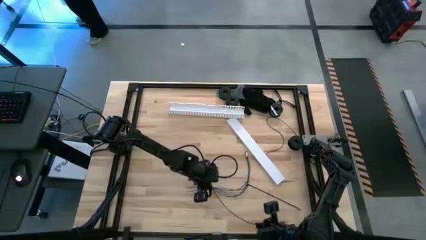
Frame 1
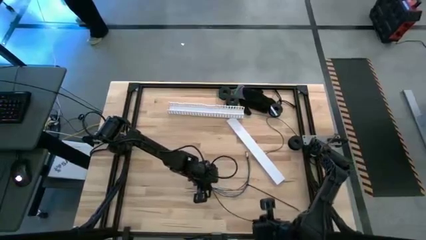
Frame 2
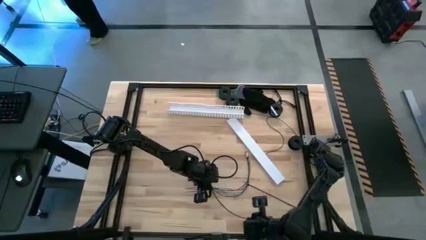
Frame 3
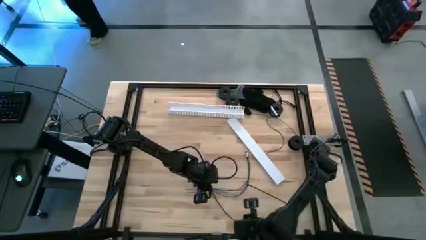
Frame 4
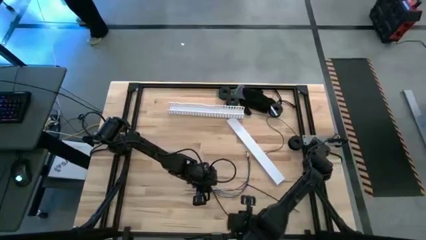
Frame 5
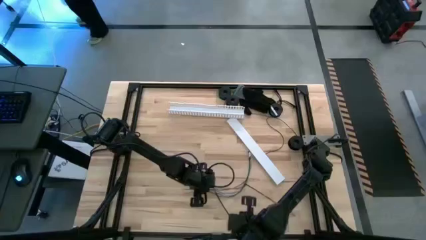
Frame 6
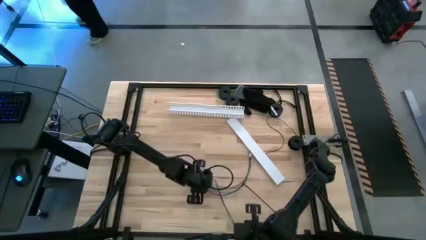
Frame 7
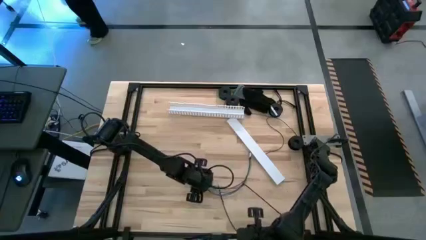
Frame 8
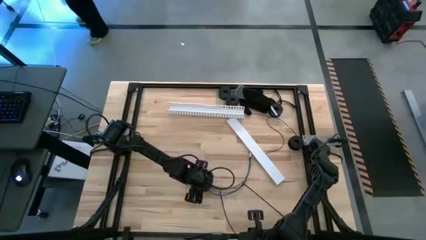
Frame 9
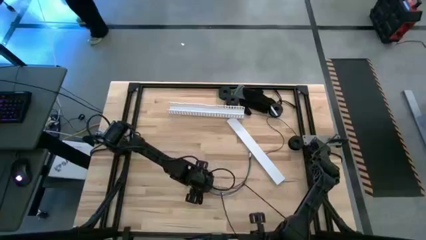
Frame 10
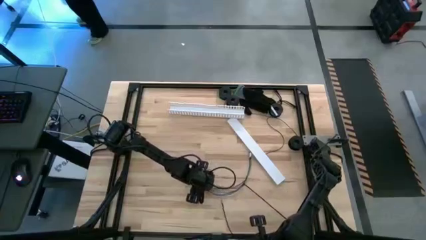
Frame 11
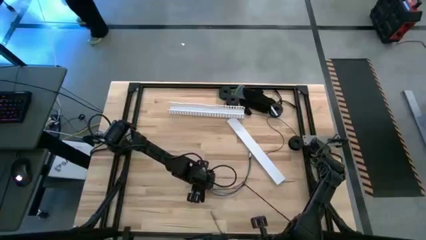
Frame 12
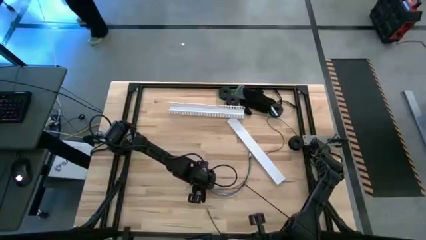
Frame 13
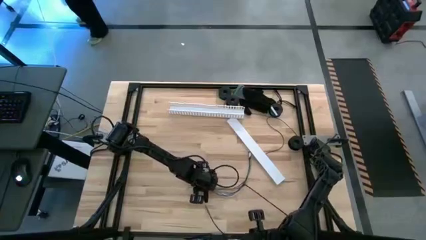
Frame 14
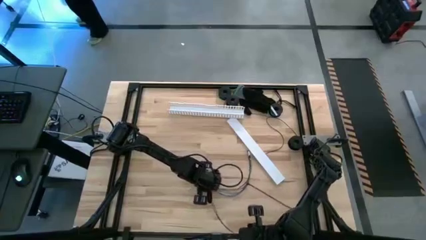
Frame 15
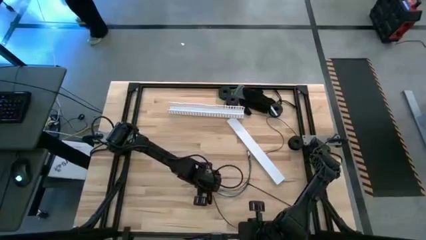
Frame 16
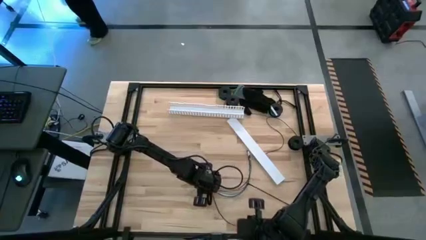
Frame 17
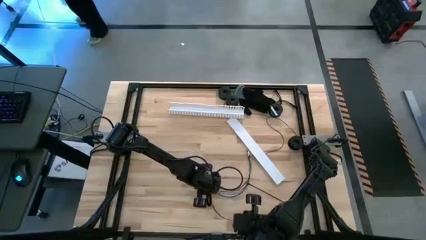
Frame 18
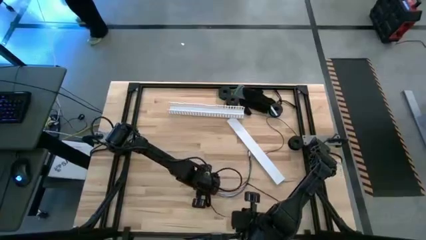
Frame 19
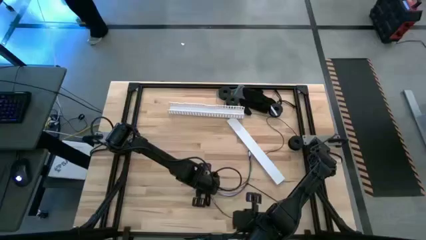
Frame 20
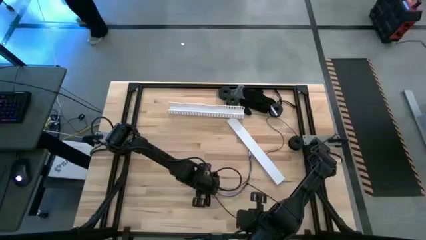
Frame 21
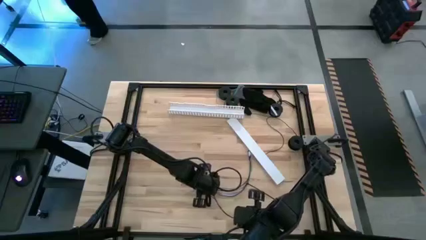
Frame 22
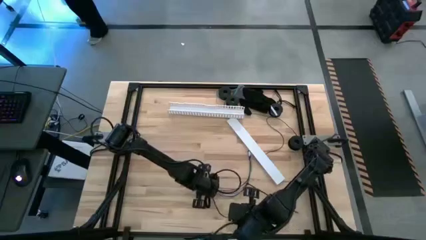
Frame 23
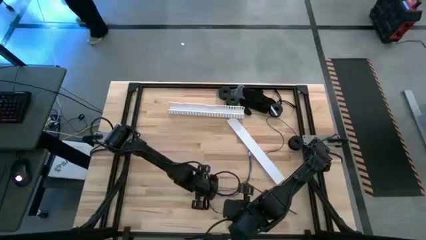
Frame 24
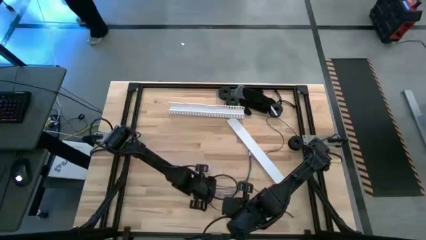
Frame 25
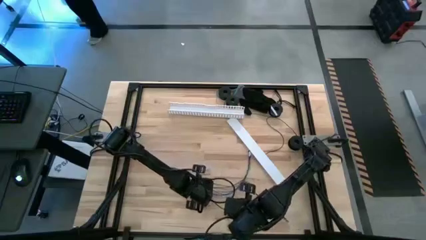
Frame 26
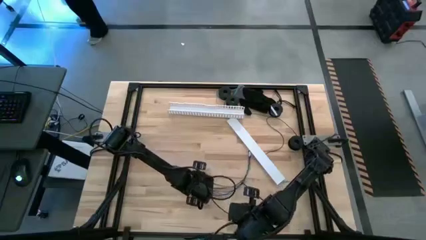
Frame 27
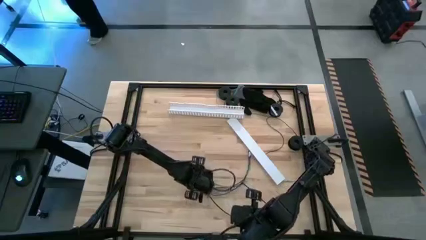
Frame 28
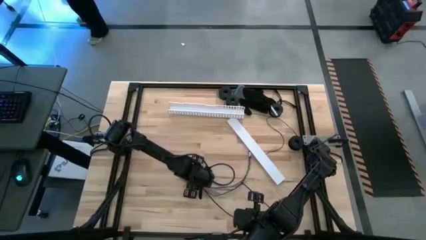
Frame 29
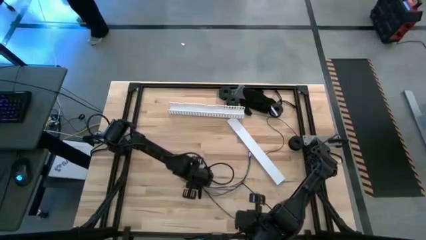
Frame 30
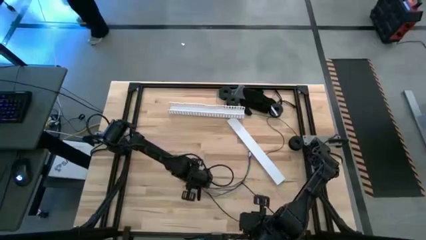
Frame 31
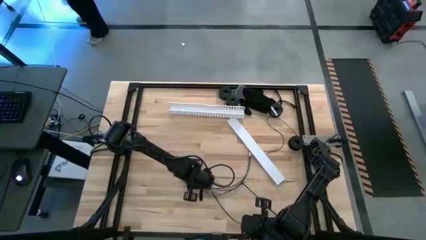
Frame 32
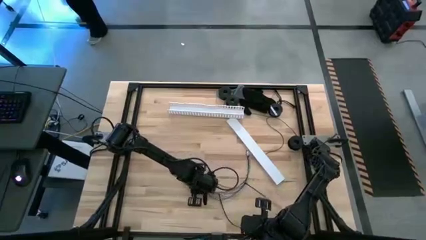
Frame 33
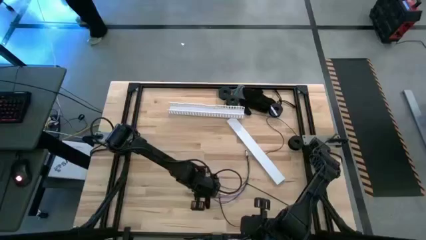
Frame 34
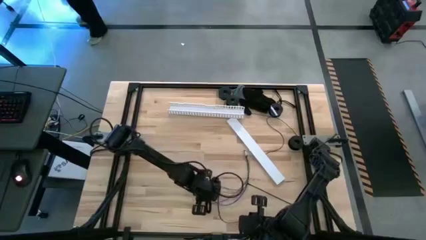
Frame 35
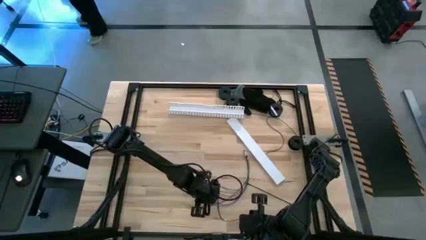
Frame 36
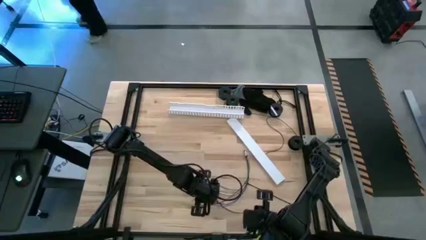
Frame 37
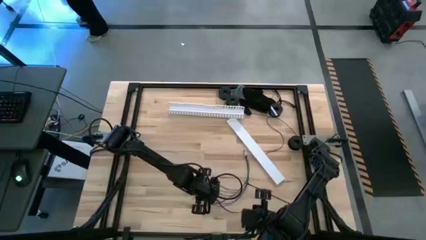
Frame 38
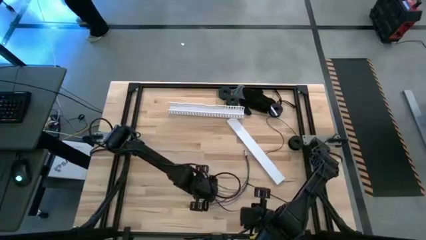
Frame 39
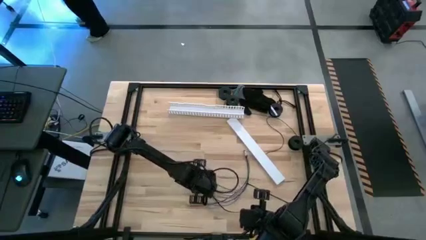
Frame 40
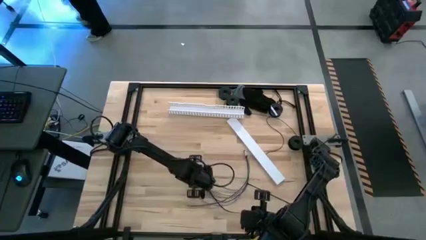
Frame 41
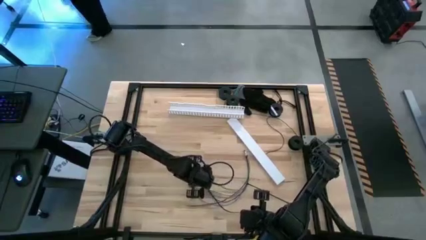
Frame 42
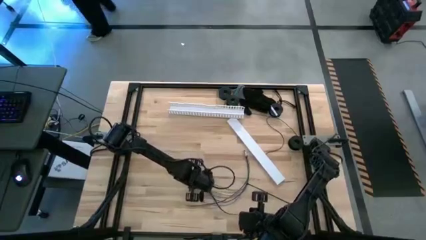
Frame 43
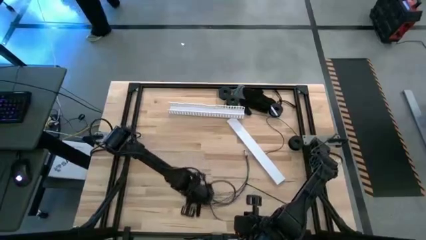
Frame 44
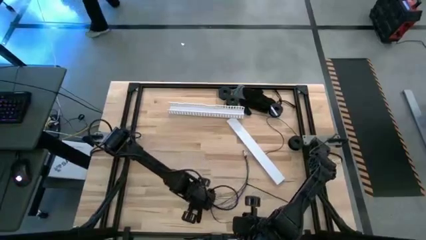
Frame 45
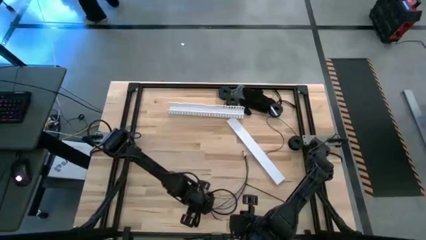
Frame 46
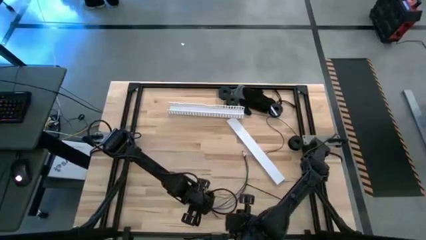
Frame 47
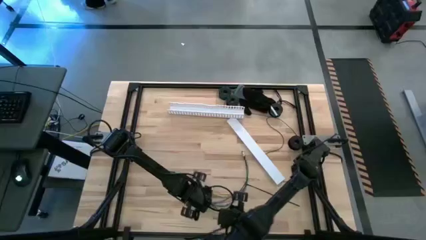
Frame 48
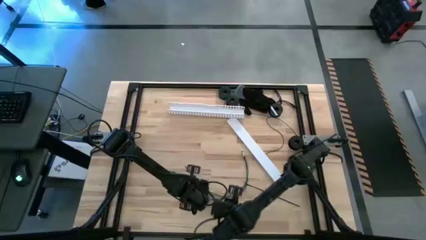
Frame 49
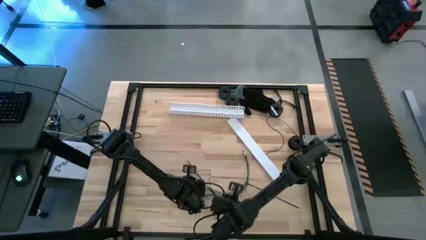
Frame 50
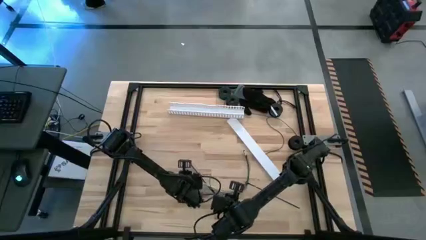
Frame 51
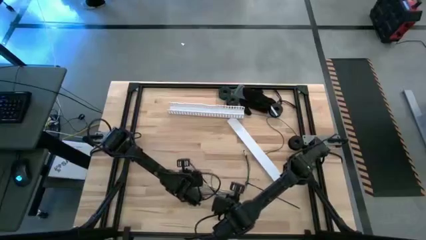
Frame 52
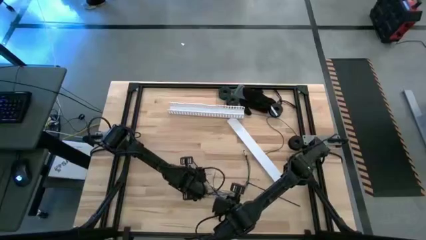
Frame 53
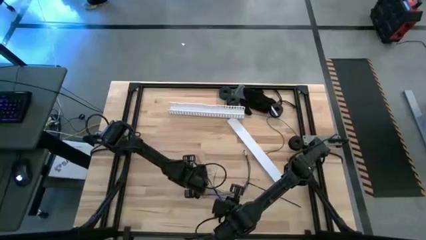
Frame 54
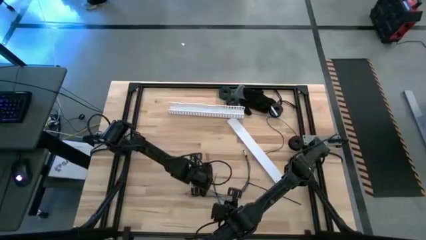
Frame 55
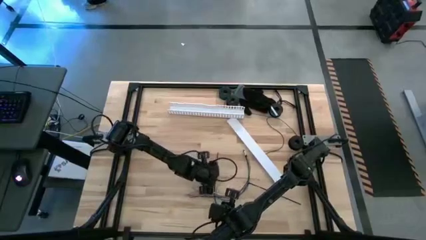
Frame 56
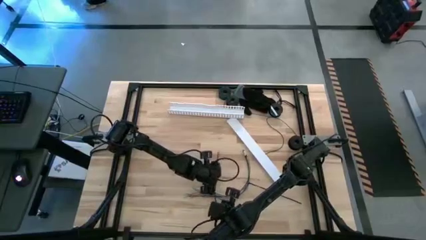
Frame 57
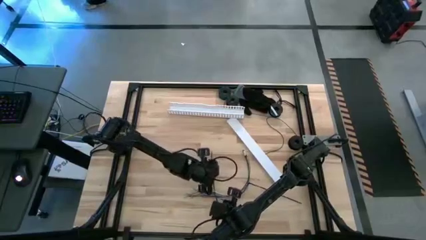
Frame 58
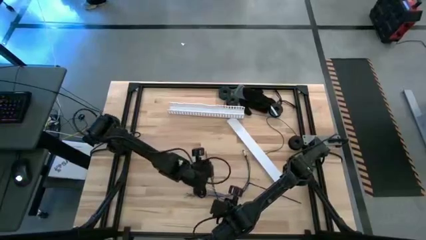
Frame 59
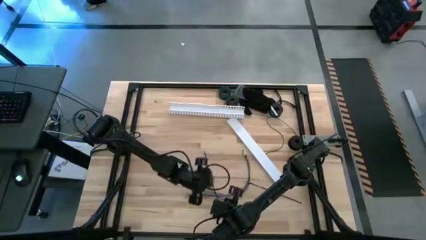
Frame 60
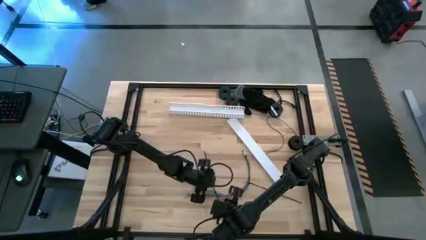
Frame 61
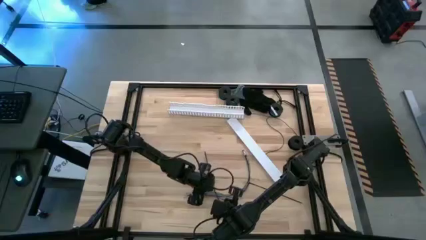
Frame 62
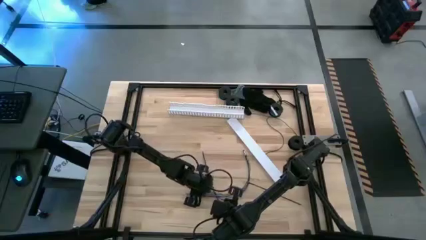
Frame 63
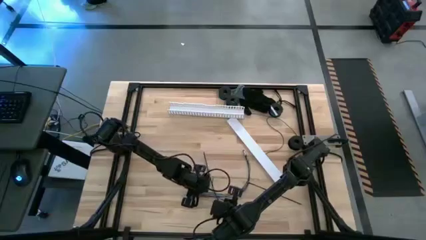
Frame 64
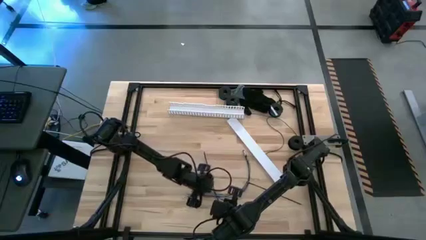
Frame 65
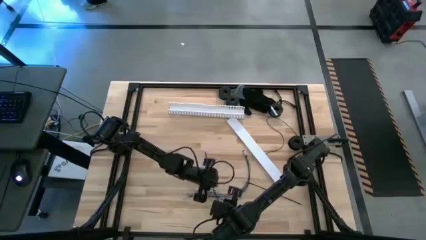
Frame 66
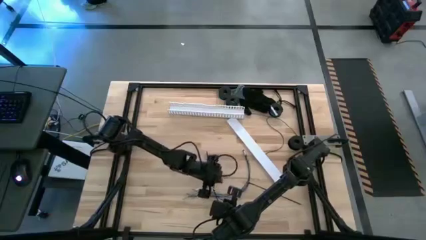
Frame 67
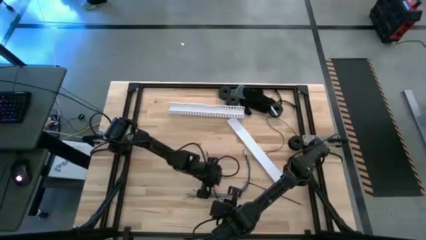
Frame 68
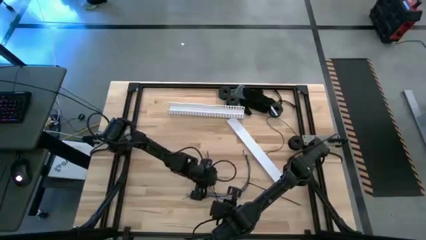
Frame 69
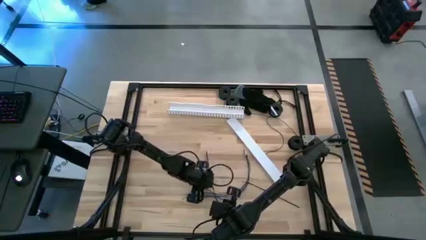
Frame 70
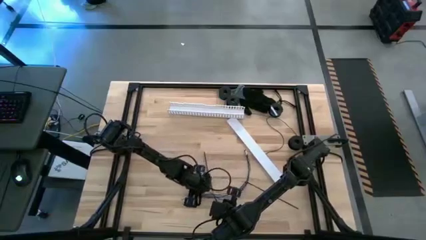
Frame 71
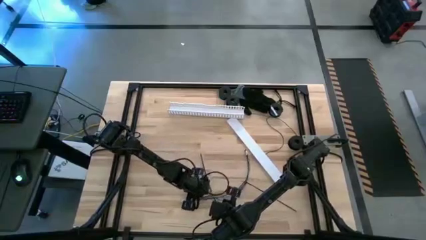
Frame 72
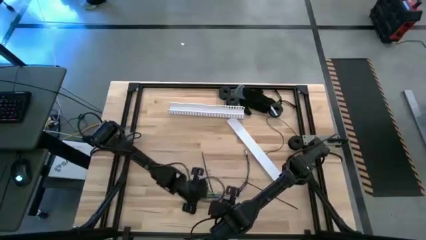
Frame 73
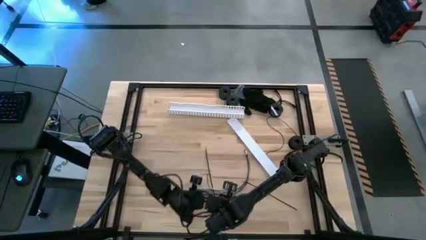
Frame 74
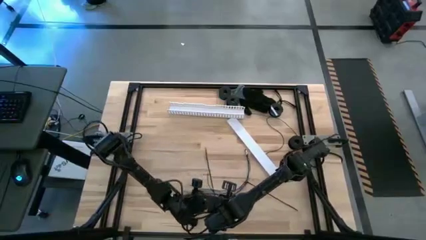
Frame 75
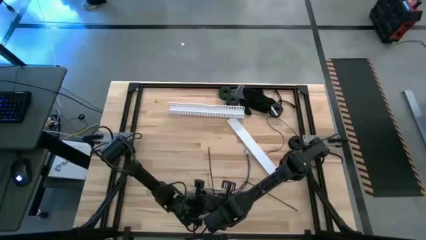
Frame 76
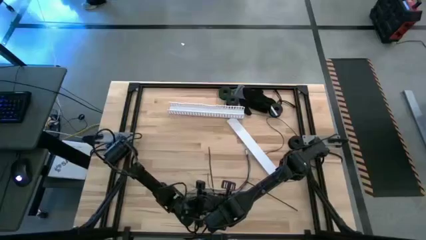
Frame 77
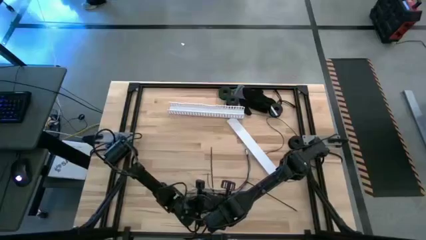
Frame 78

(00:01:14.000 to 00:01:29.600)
Task: Ziptie cables
Wrap the wire cables with the black zip tie
